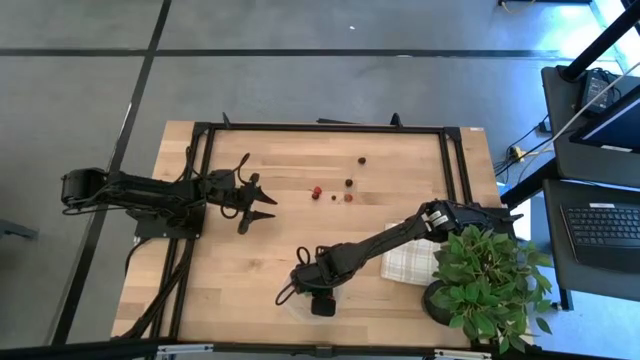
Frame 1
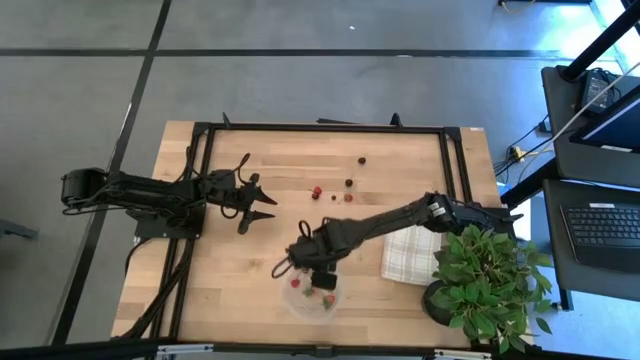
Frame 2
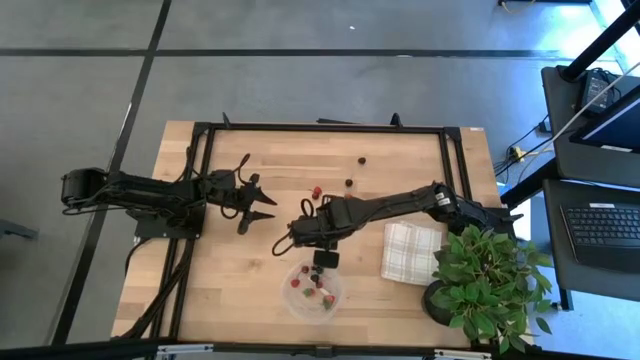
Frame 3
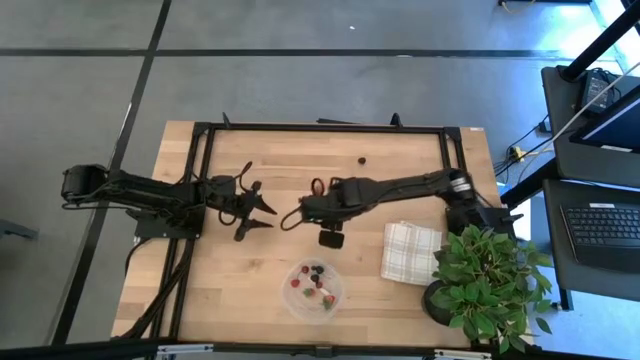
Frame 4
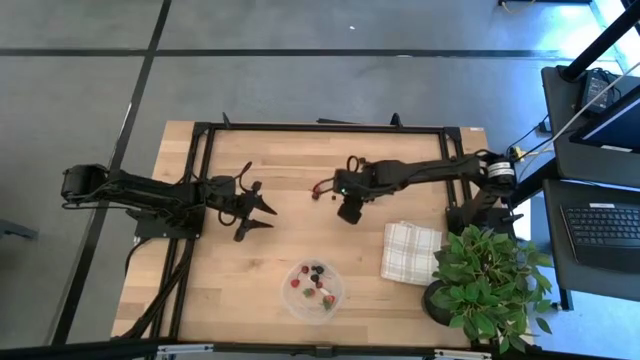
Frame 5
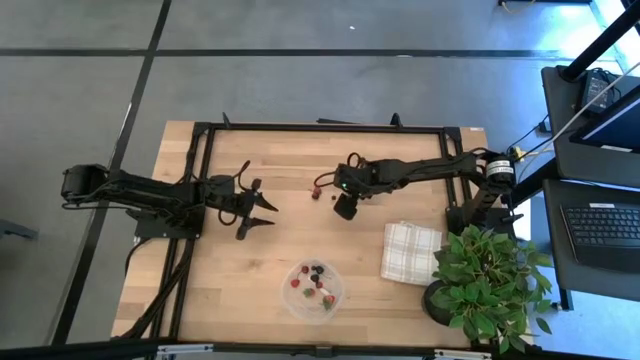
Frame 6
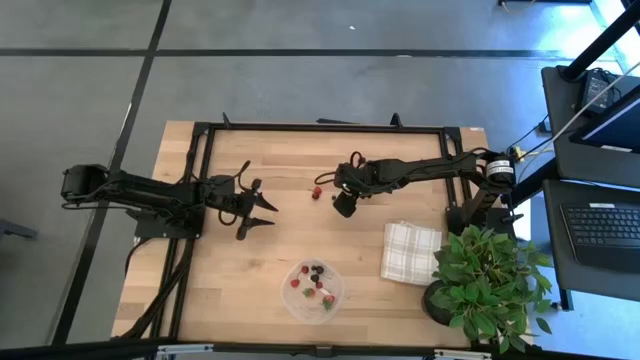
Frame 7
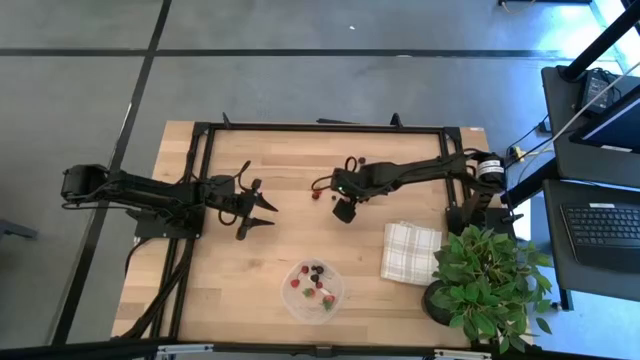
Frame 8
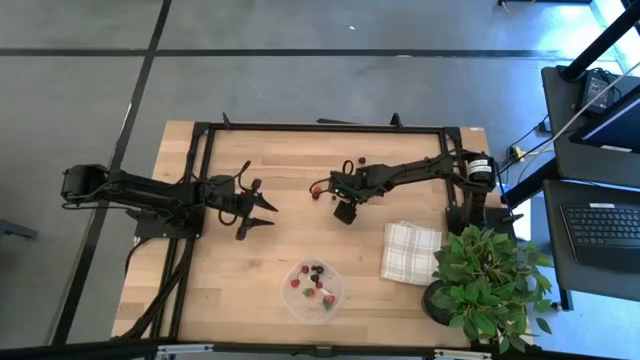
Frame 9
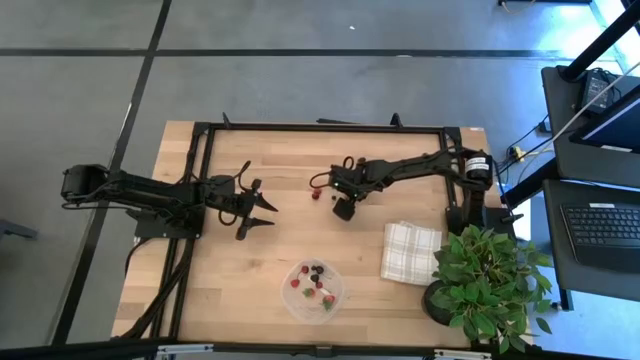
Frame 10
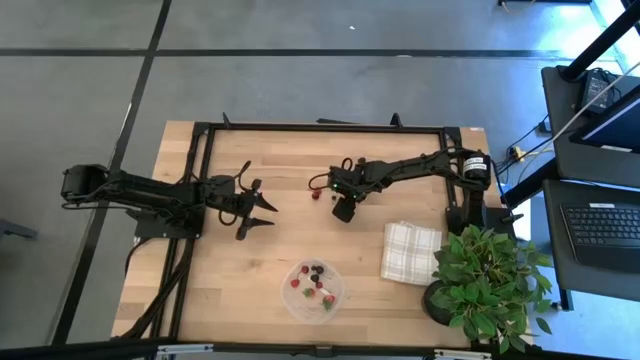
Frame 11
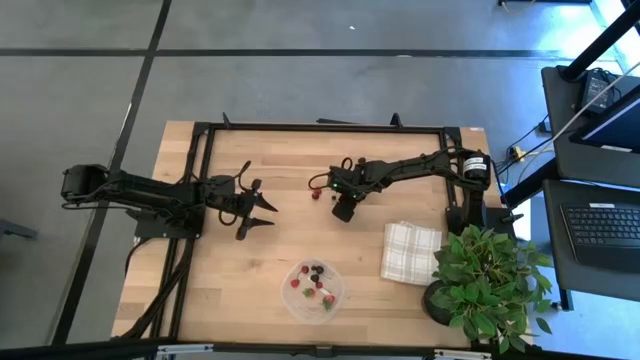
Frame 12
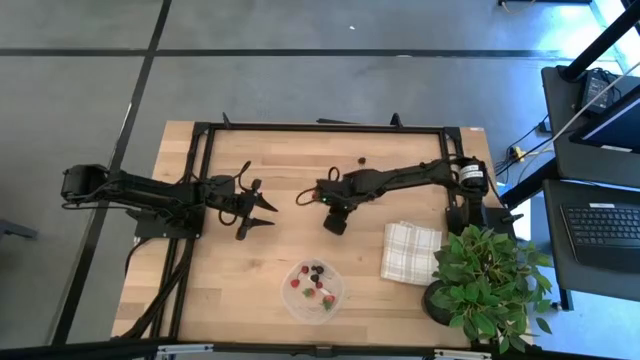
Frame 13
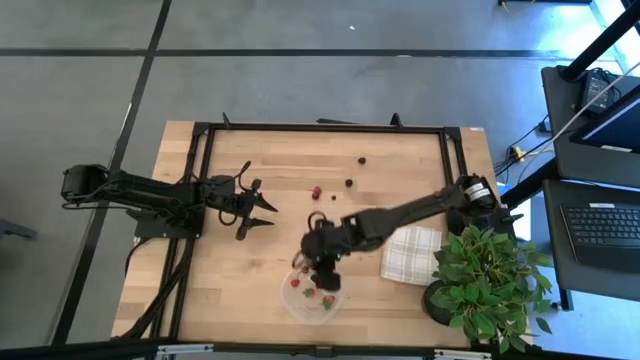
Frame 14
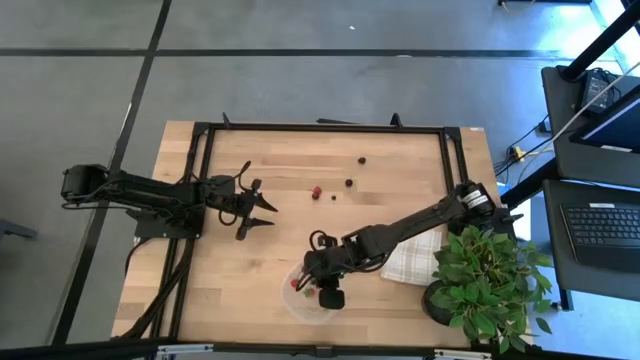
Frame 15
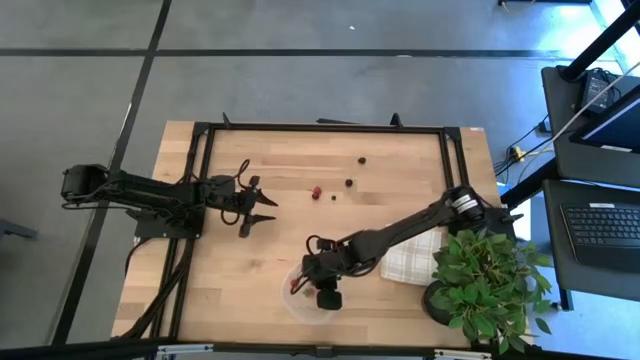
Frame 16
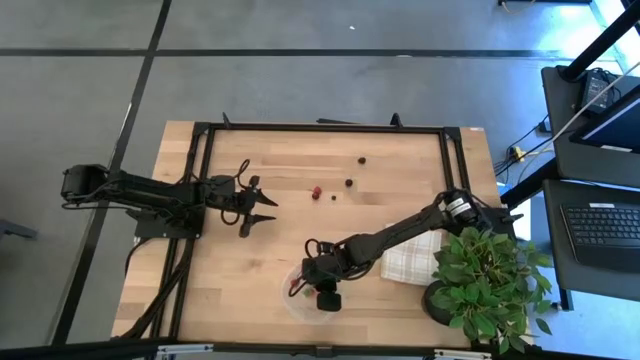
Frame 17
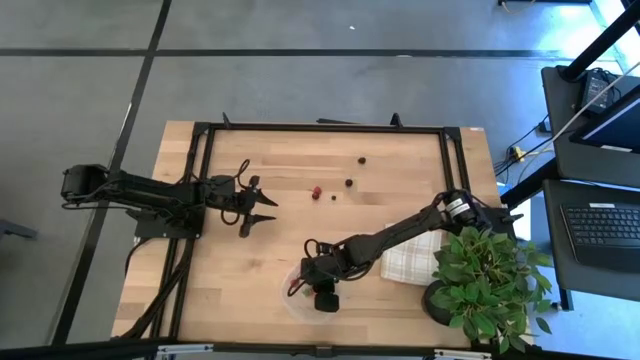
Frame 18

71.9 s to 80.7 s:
Task: Pick and placing Produce into tupperware
Put the red strawberry in the bottom transparent bin

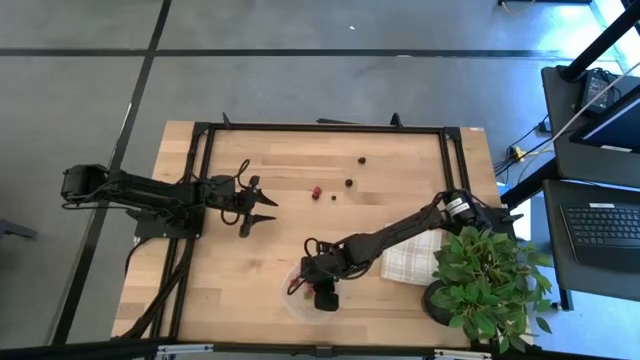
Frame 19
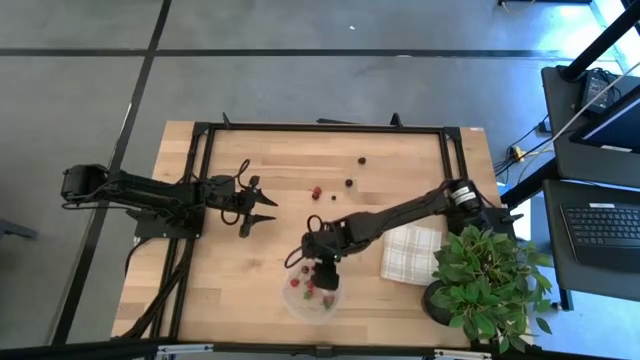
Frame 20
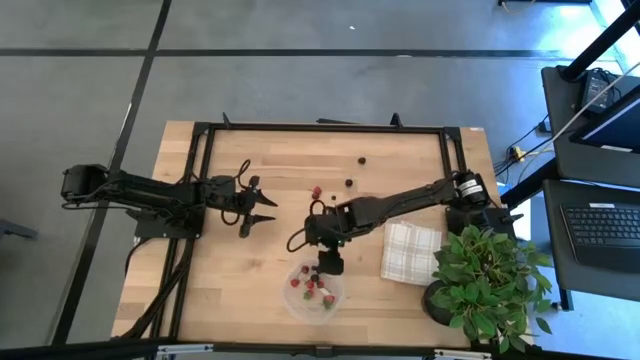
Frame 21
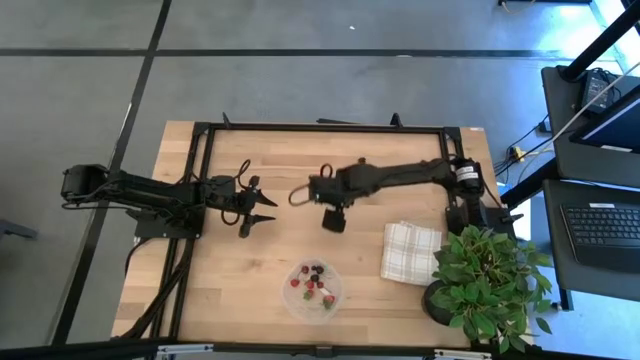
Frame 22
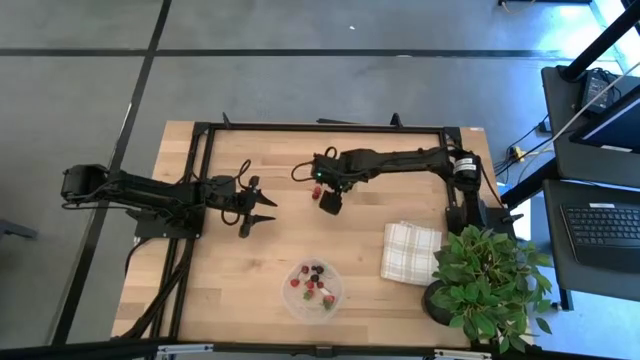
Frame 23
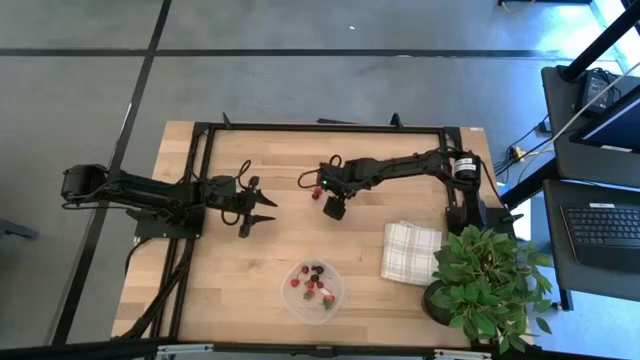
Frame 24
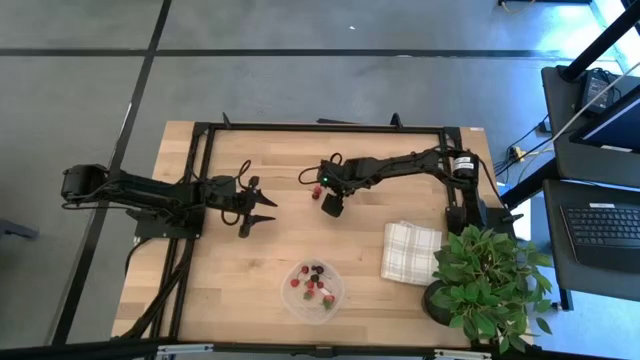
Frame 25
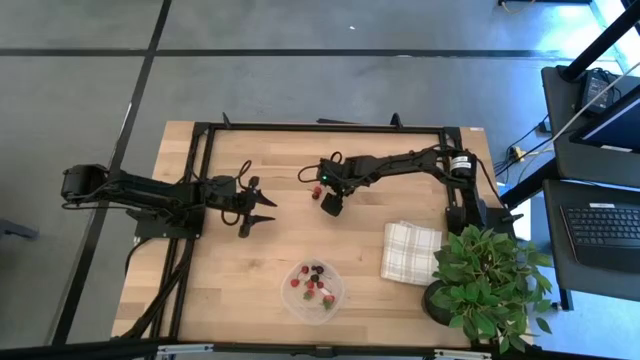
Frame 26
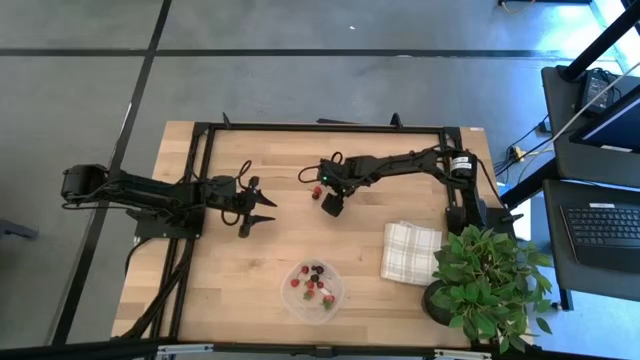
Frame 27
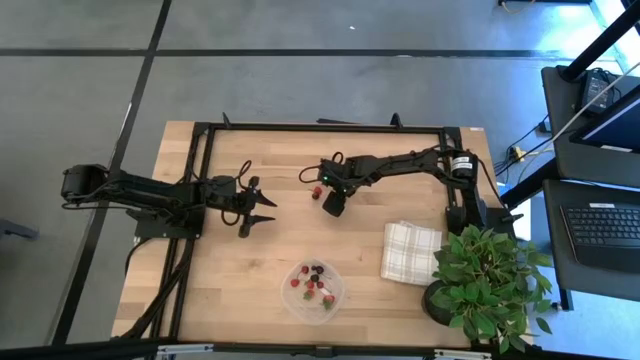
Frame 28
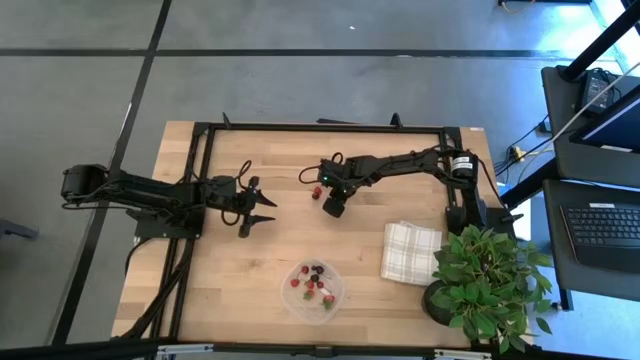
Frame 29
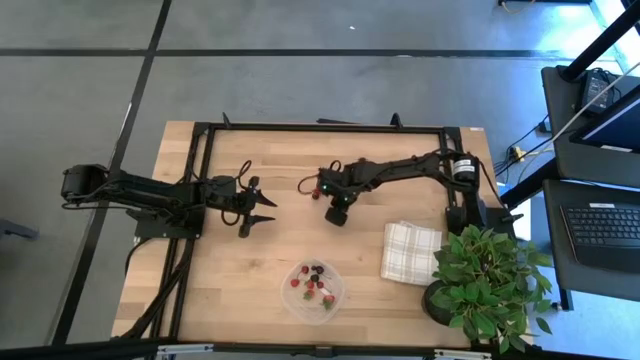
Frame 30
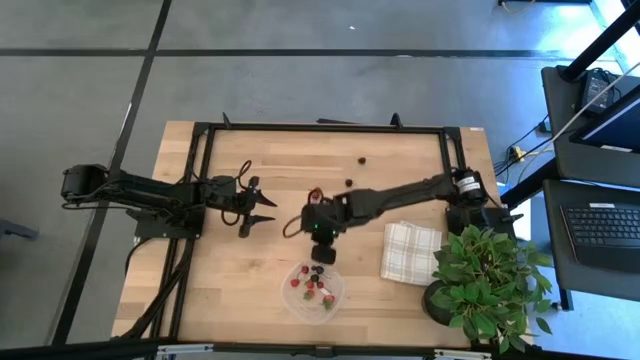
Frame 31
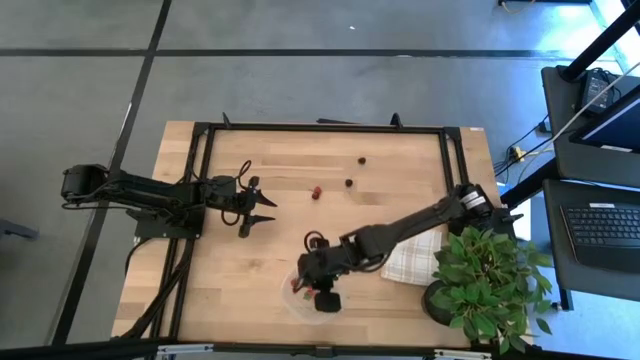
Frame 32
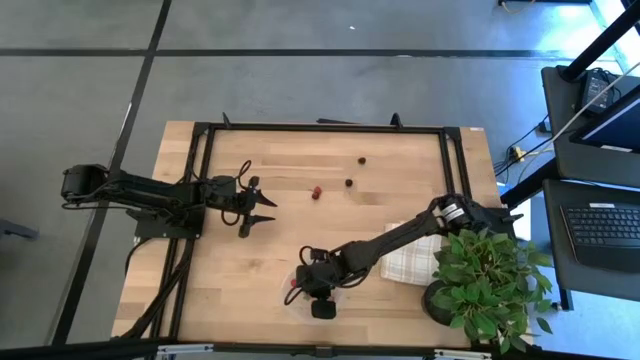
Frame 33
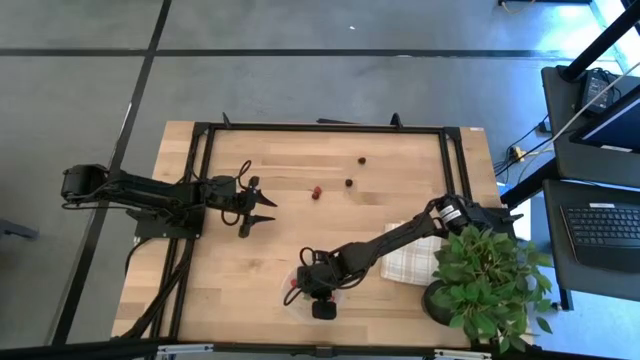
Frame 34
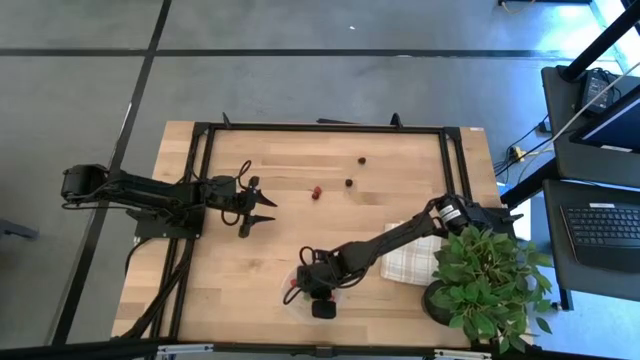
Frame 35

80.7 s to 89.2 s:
Put the blueberry in the bottom transparent bin

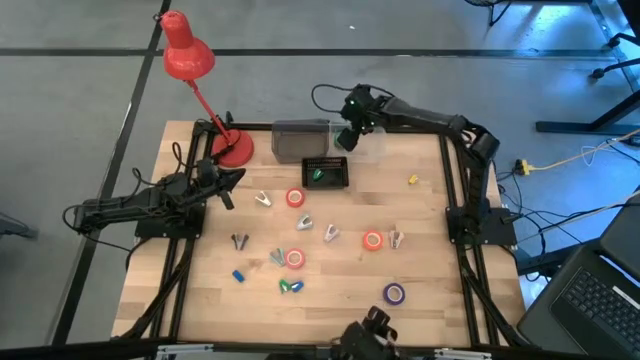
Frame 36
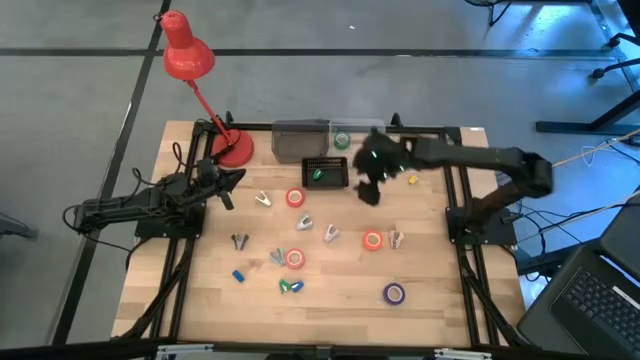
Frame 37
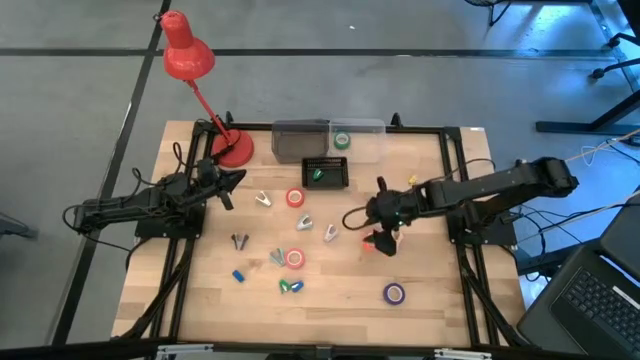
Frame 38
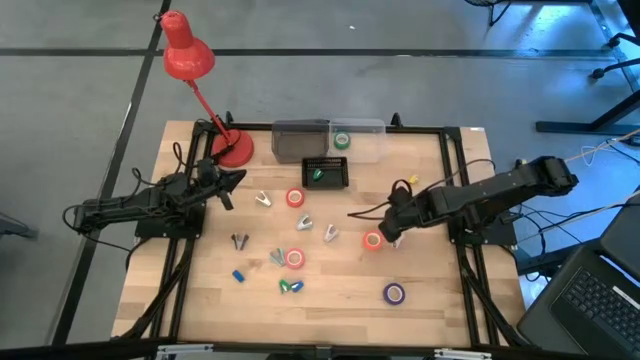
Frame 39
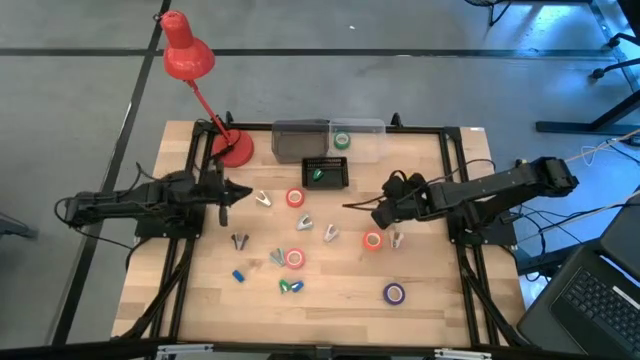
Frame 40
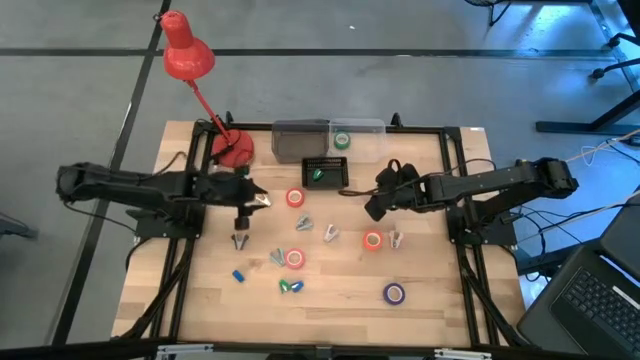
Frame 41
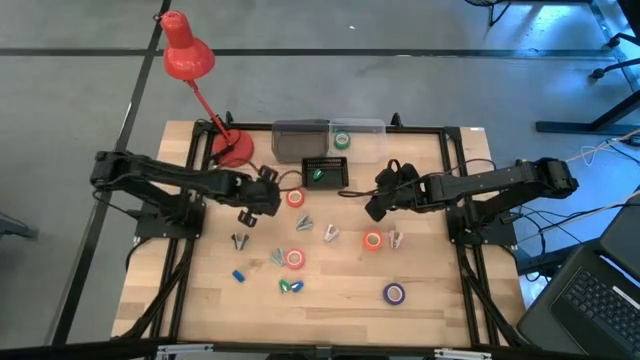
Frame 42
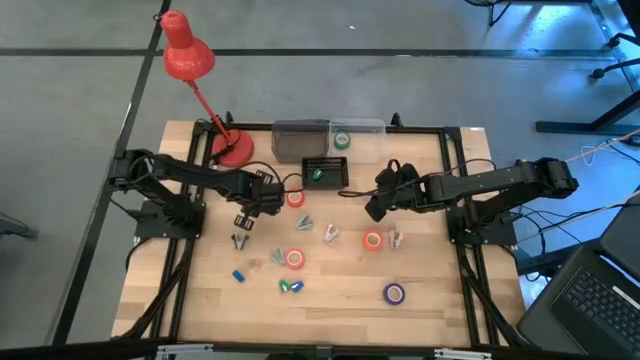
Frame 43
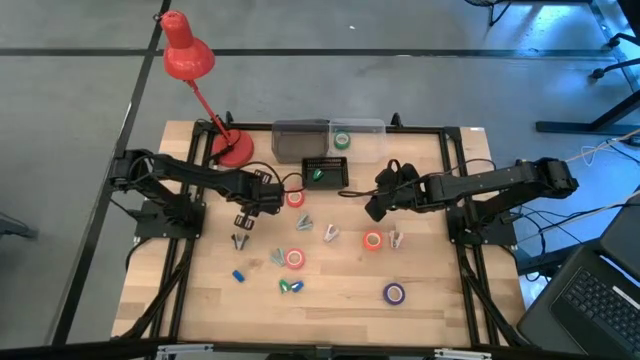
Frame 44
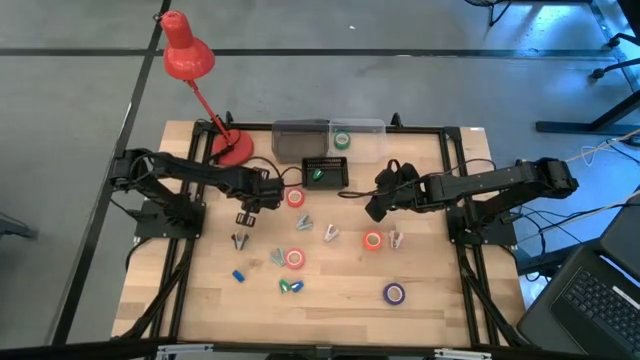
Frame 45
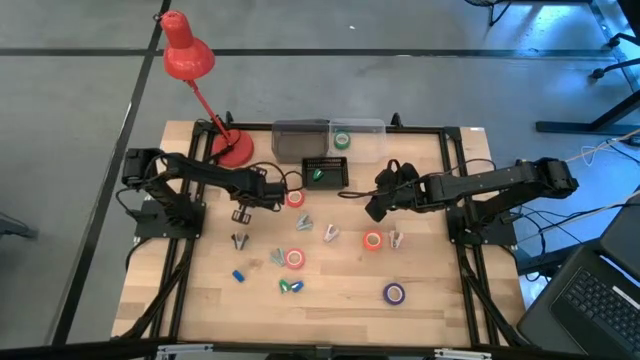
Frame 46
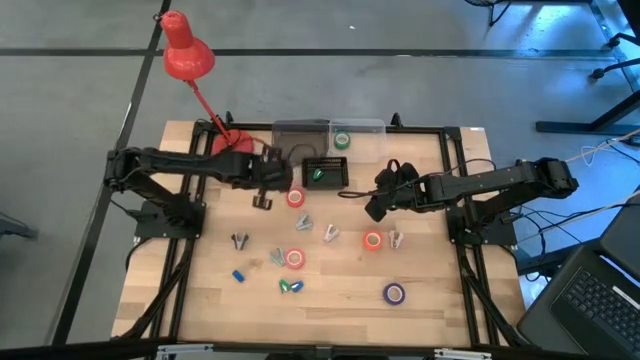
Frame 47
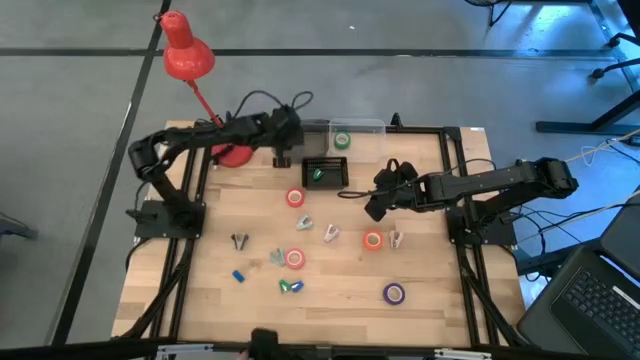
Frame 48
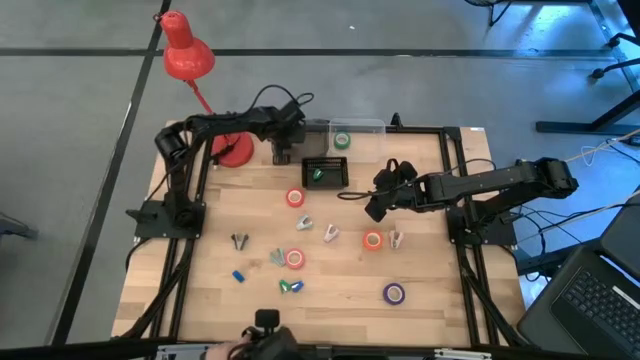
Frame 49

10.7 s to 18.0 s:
Task: Pick and place Stapler, Stapler remover, tape
Put the gray staple remover into the gray bin
